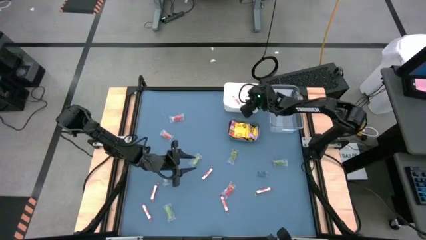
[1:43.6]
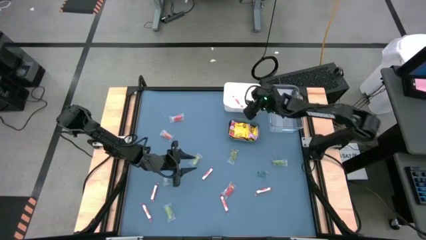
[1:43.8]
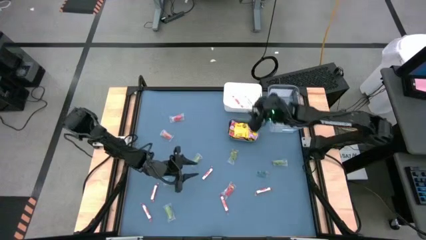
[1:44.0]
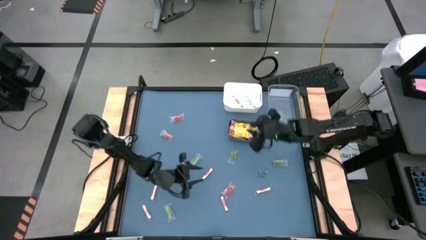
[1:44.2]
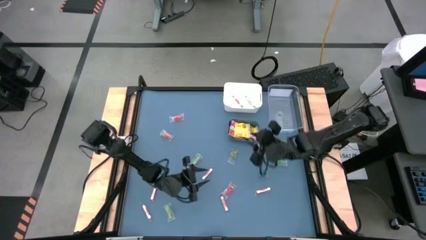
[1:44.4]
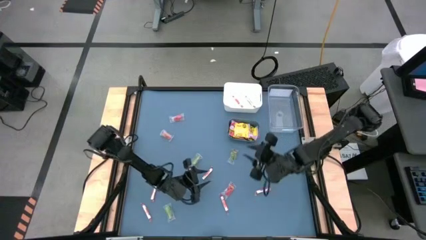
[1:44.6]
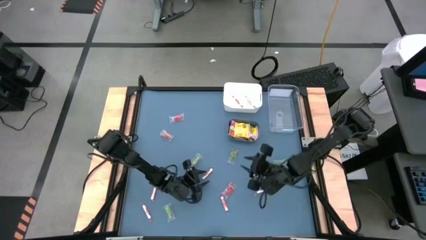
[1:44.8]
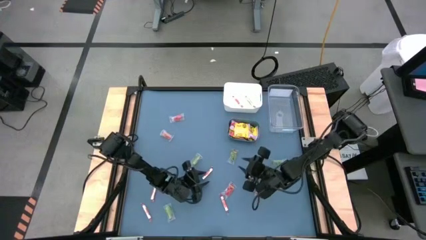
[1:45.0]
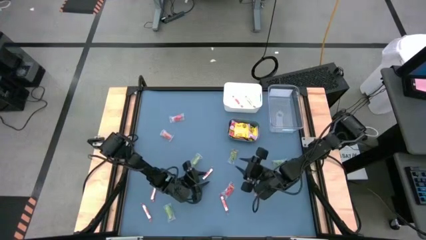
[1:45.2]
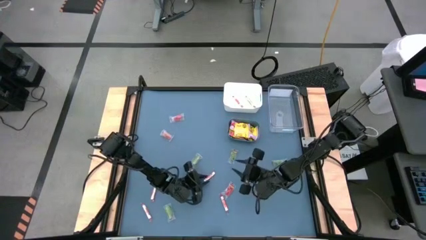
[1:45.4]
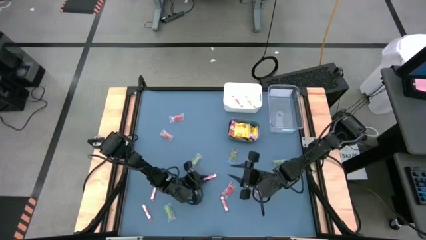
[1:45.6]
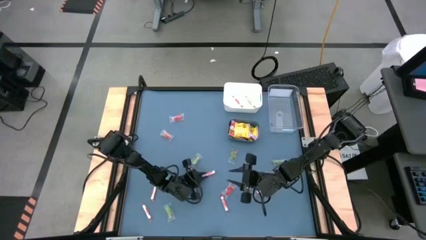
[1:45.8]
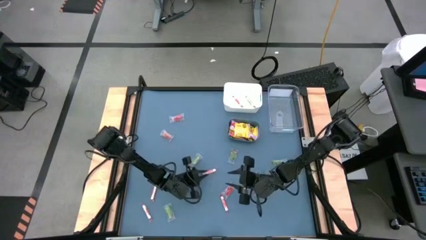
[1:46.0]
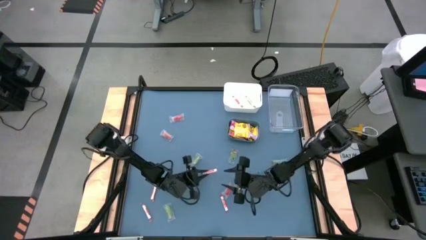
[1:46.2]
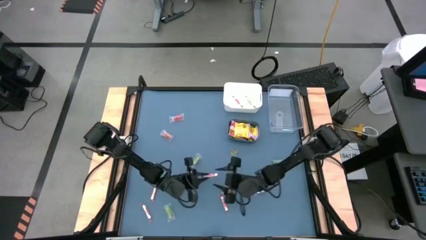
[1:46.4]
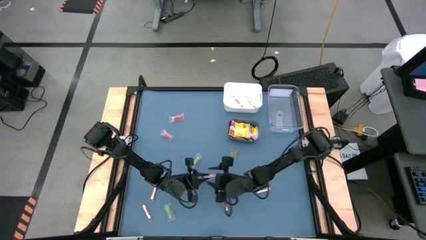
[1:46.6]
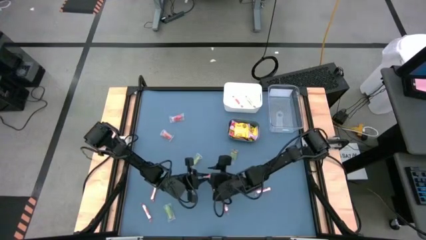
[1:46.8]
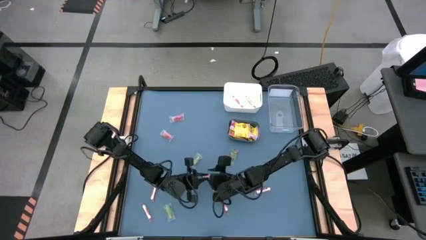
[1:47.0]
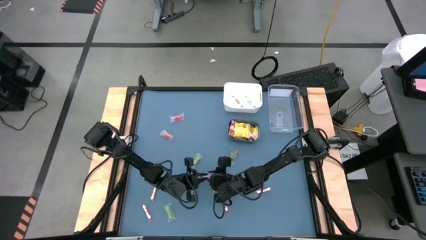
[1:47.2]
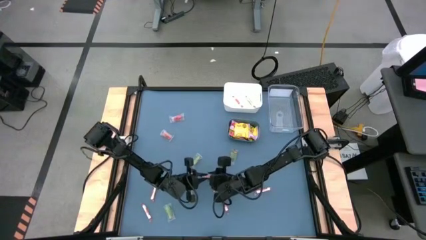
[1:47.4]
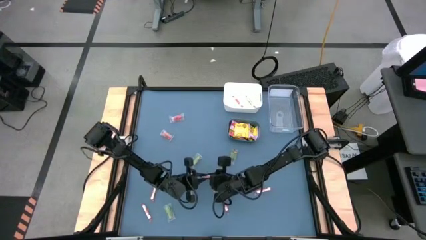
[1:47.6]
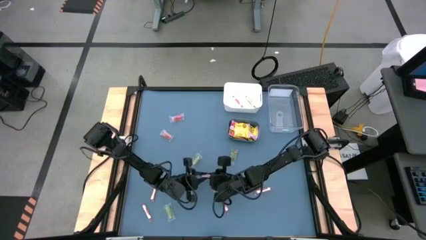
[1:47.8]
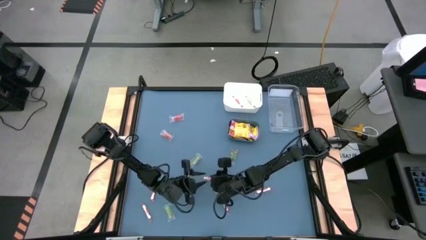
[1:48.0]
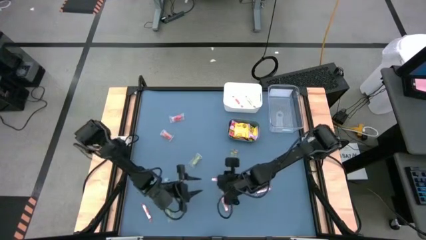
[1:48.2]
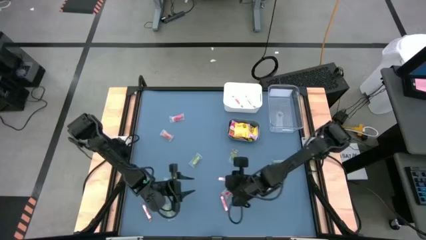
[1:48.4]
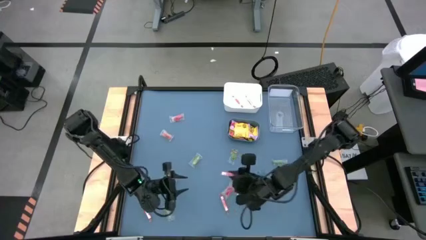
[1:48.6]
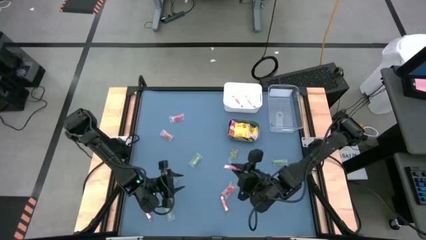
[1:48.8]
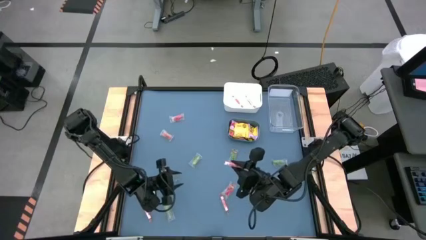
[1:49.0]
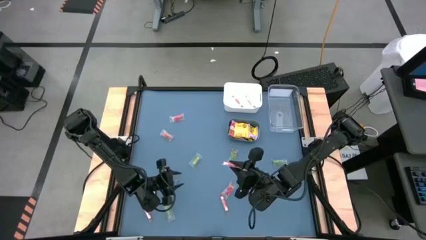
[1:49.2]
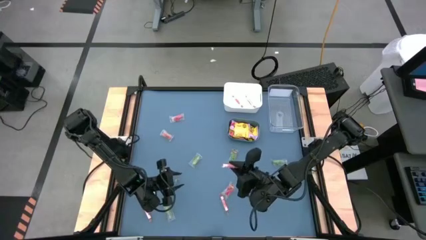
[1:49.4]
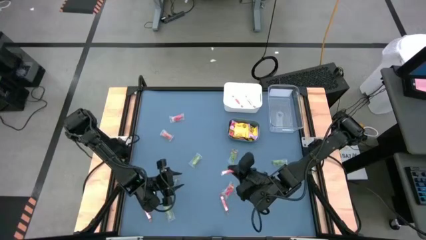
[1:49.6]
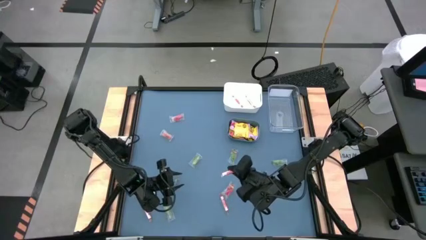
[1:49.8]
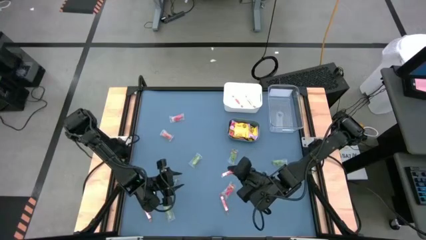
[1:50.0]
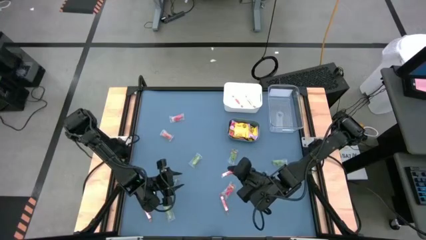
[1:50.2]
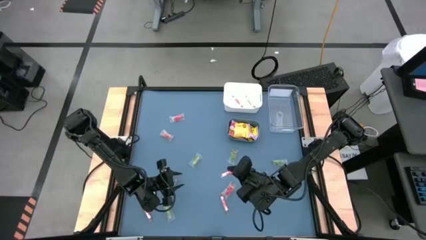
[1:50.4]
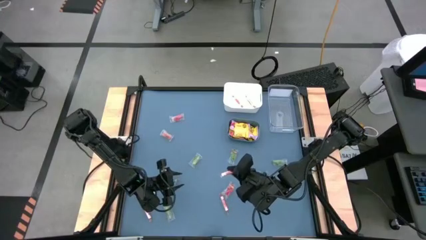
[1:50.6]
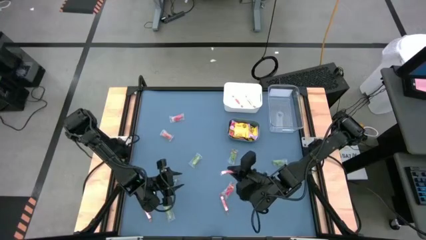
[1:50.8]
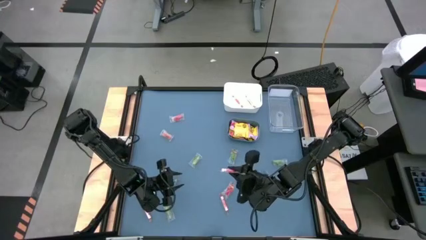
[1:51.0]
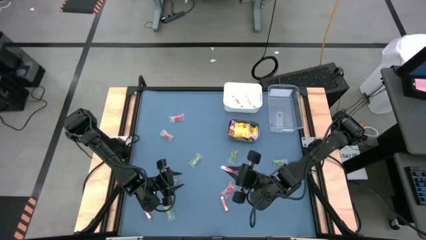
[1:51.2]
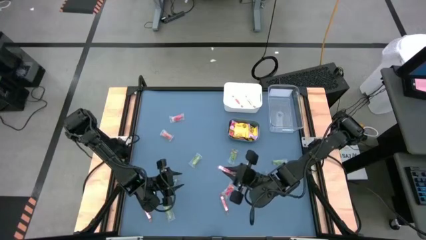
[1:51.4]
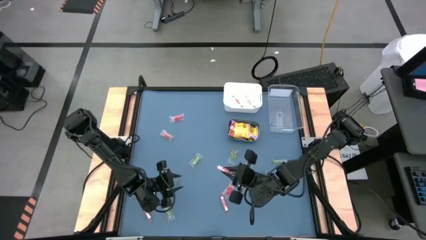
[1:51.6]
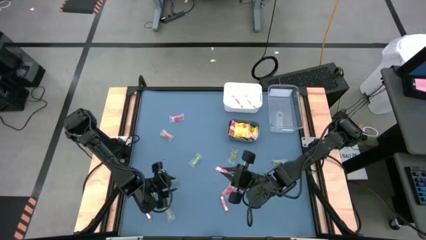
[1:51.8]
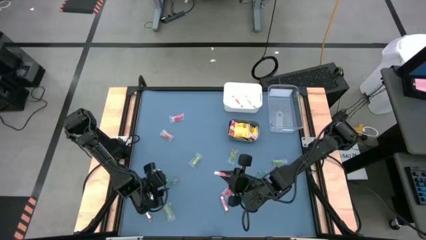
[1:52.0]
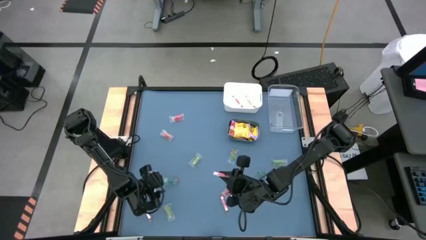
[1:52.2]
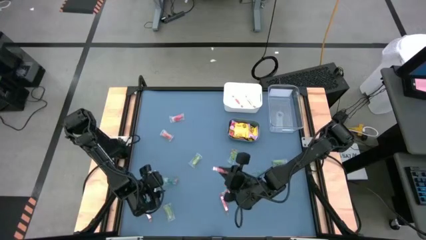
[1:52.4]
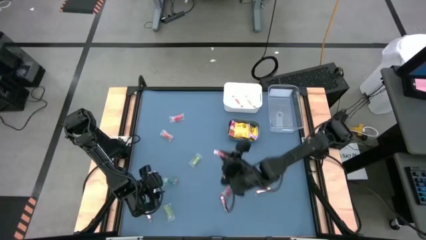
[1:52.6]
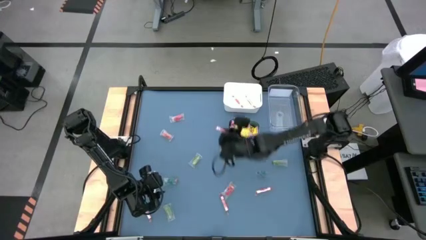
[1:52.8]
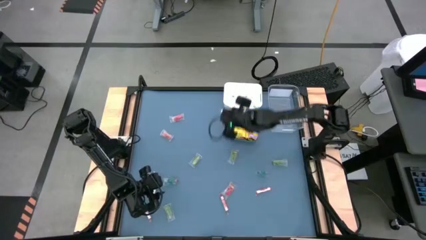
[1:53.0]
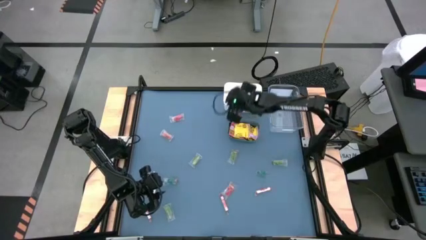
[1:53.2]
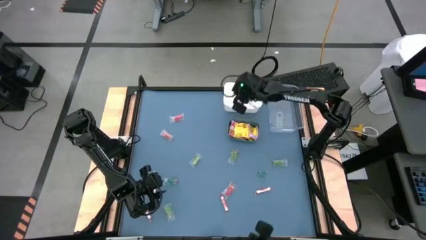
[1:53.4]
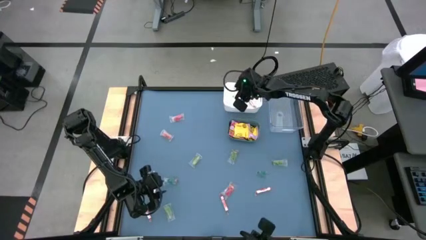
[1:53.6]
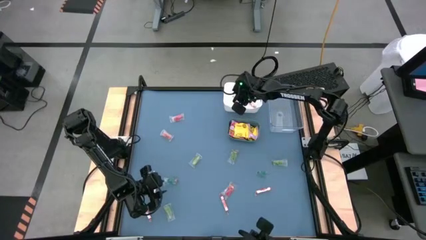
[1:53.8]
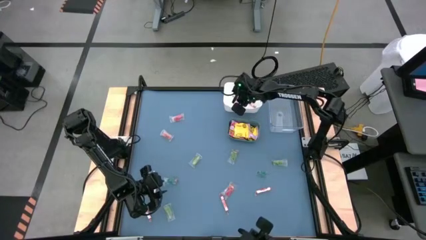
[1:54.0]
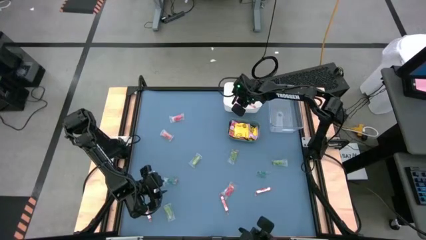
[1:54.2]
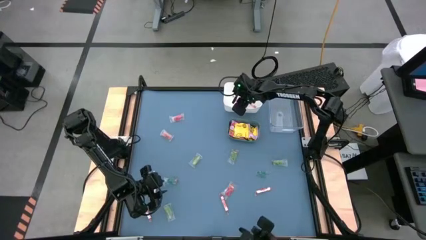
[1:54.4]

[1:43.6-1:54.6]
Task: Sort candy
Put the center white candy into the white bin

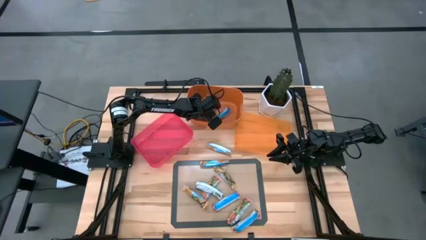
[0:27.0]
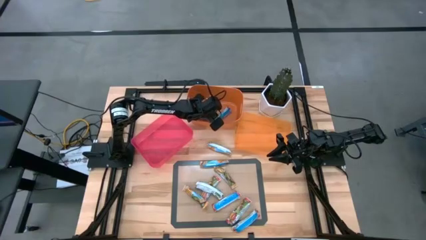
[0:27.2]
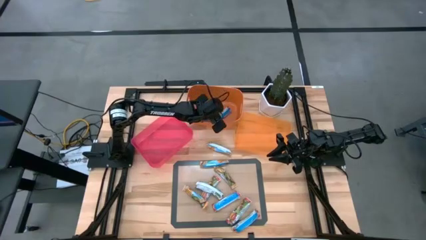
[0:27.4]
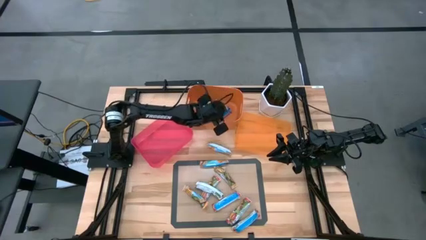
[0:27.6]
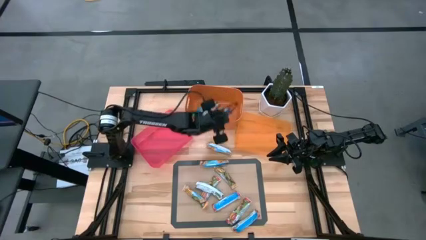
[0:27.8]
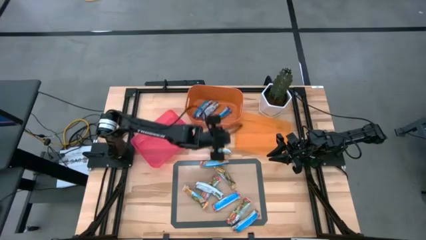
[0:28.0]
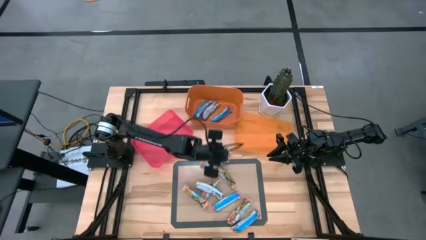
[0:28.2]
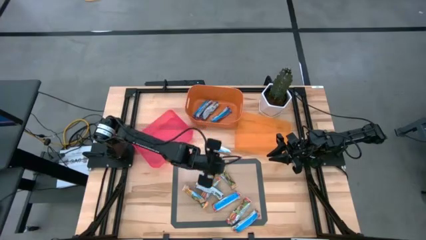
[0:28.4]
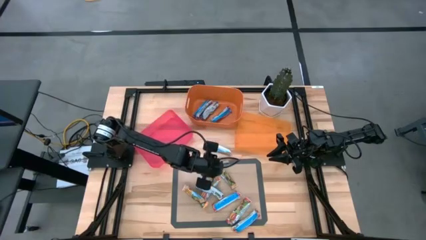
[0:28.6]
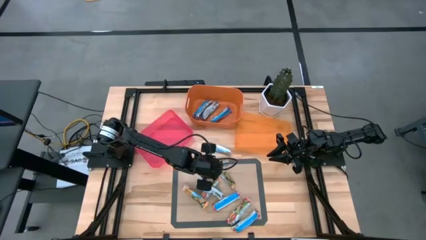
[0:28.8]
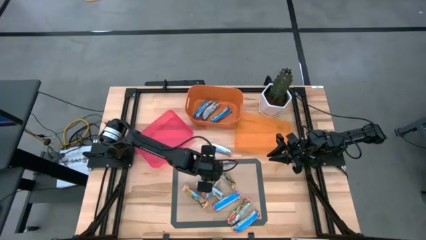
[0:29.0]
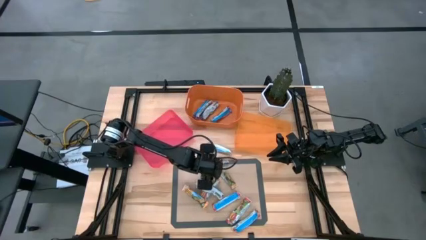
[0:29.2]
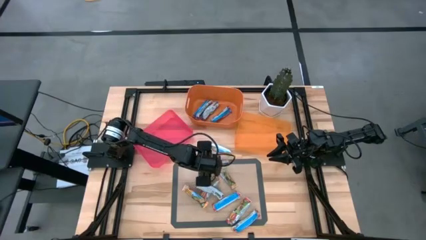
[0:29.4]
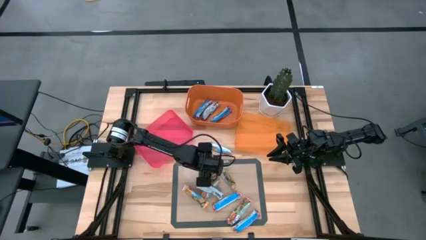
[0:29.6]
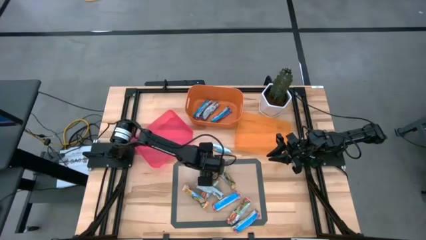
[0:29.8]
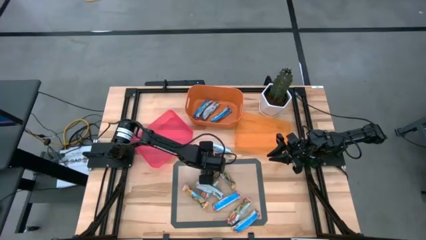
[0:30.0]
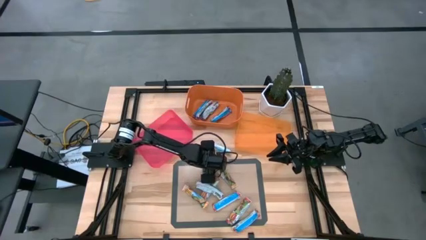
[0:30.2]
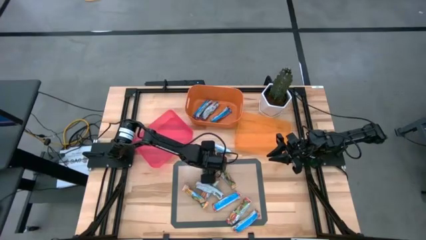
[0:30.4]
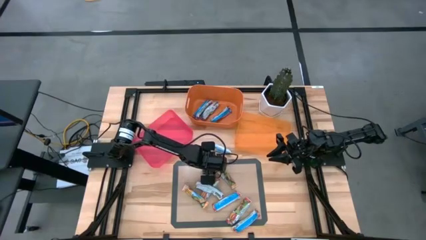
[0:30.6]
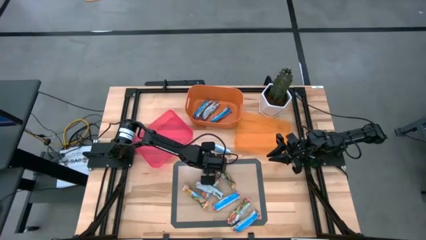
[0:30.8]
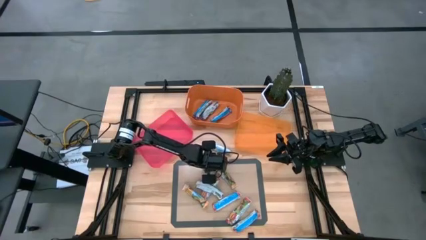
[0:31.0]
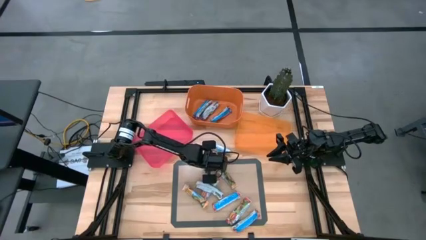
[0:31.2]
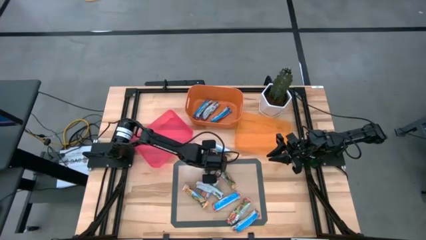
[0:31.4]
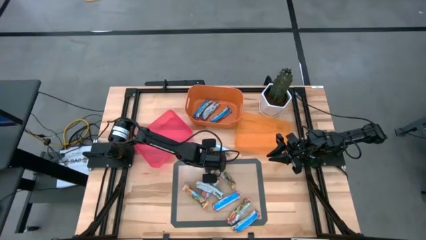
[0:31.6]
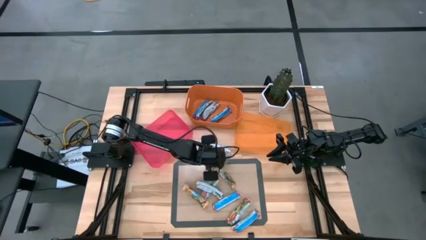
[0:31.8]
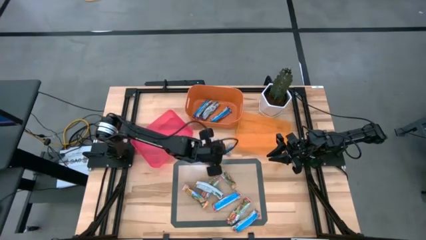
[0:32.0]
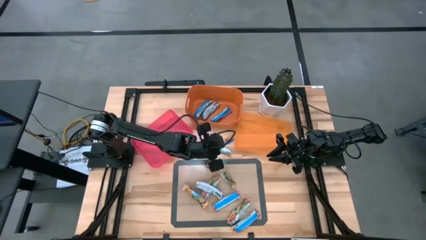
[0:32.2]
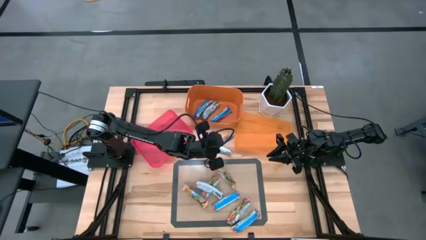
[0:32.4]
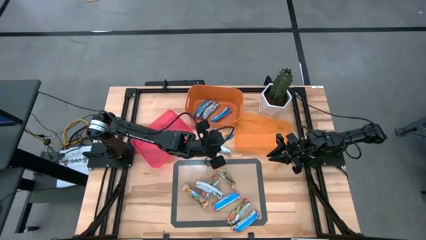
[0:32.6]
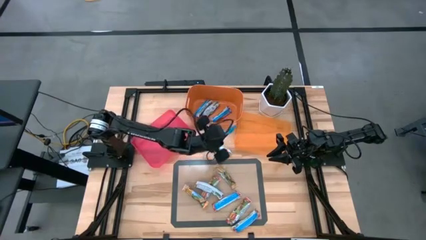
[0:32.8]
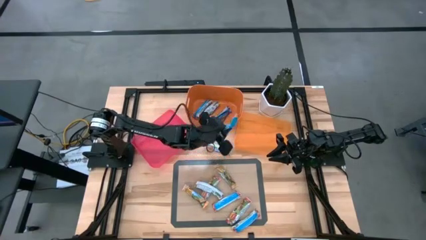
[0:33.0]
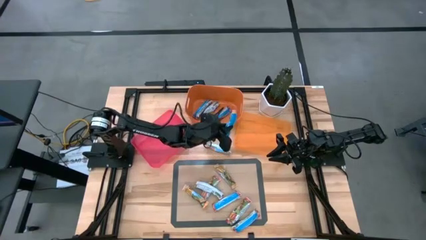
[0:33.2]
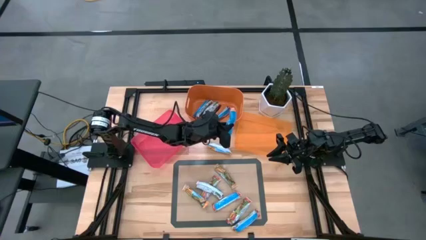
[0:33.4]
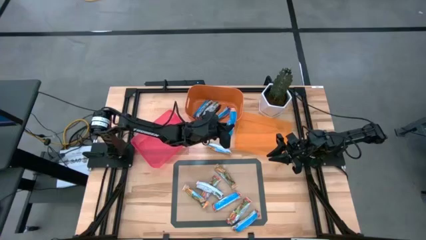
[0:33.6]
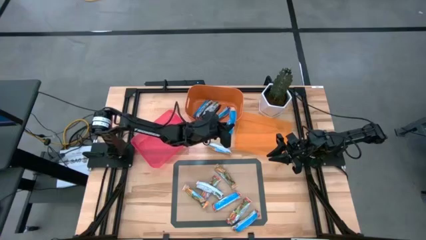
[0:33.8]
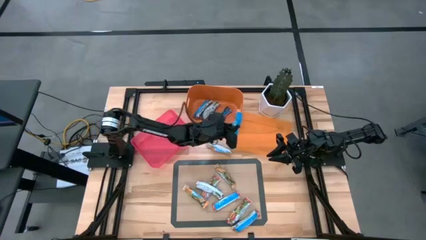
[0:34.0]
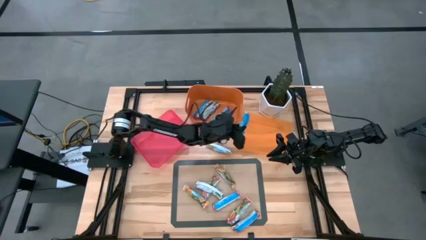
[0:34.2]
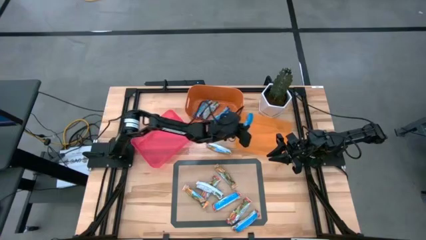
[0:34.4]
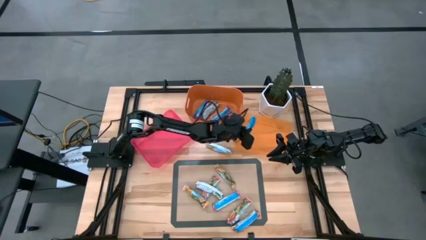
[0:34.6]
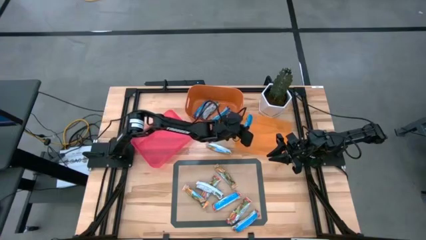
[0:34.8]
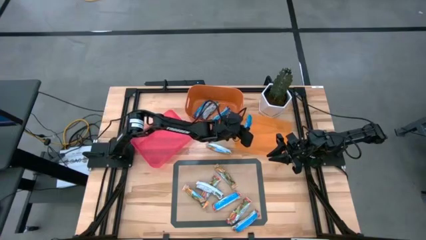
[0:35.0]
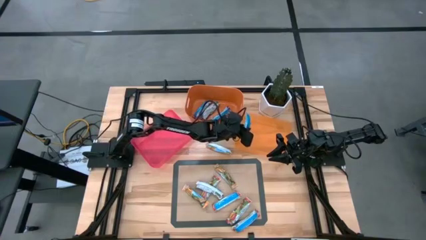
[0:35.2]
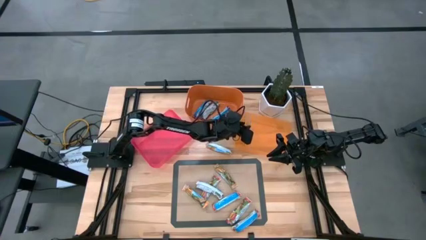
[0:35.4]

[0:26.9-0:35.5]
Task: Pick and place Granola Bars by type
Put the yellow granola bar into the light orange bin
